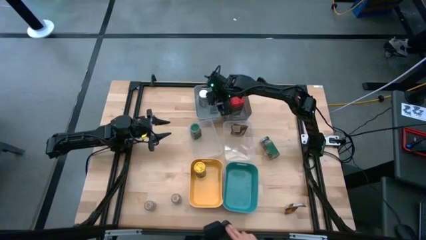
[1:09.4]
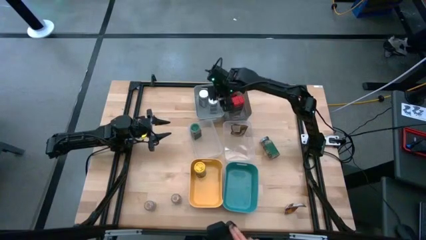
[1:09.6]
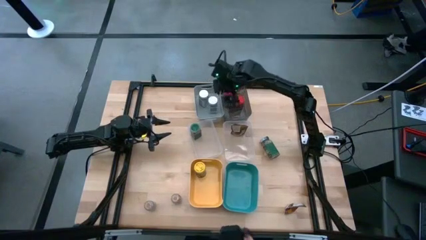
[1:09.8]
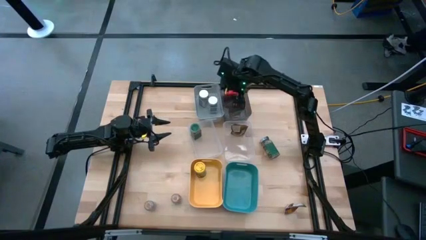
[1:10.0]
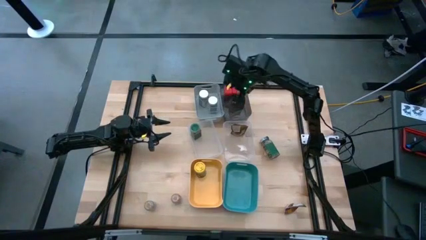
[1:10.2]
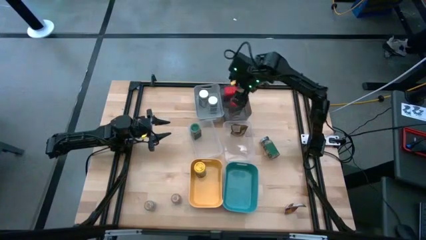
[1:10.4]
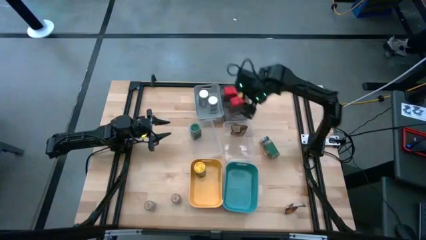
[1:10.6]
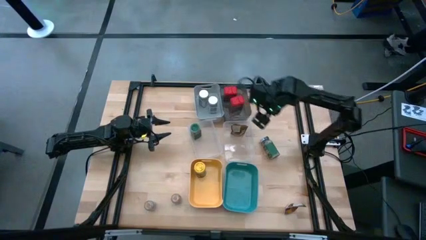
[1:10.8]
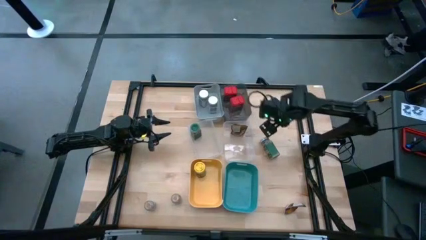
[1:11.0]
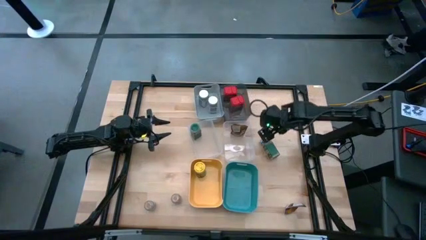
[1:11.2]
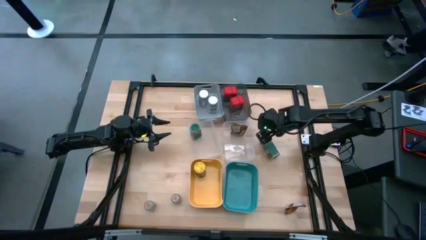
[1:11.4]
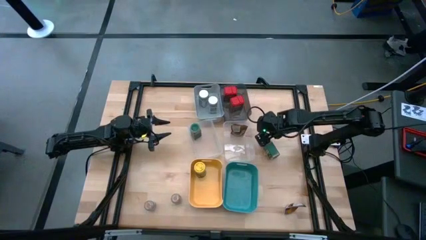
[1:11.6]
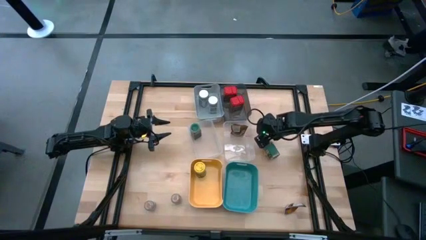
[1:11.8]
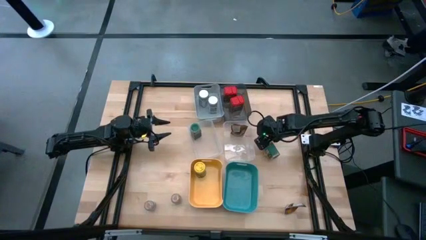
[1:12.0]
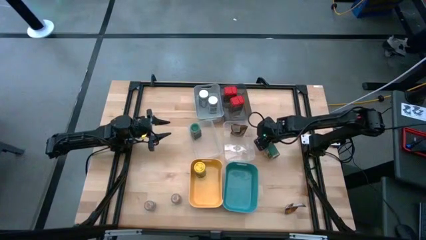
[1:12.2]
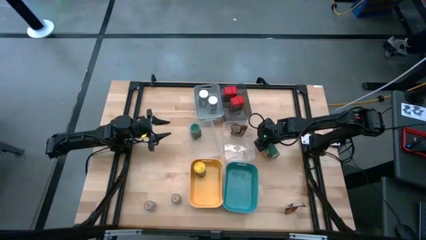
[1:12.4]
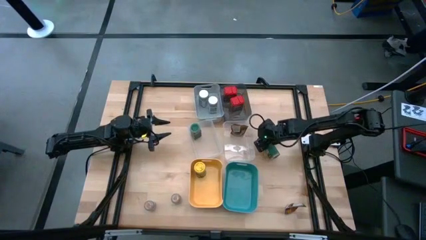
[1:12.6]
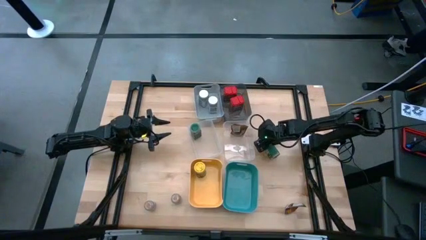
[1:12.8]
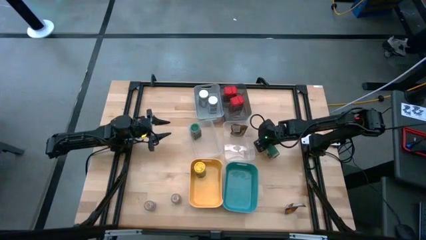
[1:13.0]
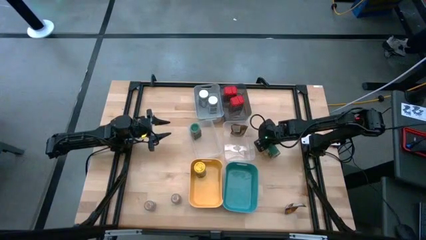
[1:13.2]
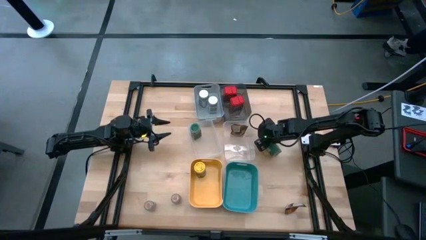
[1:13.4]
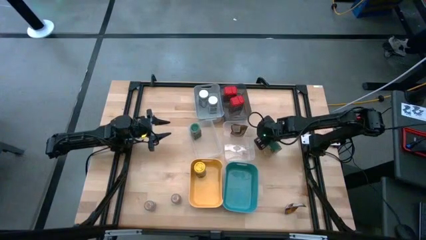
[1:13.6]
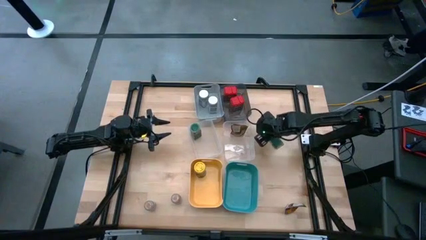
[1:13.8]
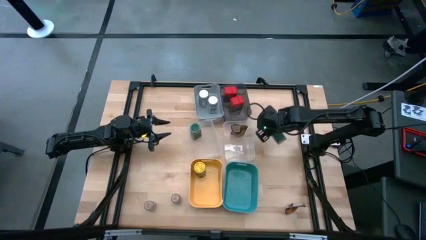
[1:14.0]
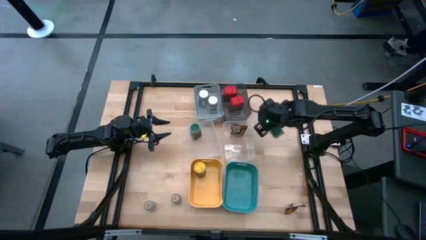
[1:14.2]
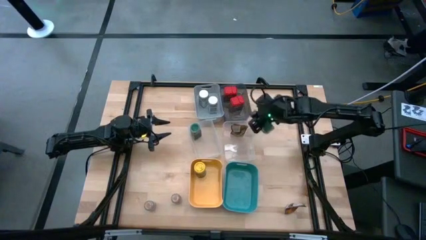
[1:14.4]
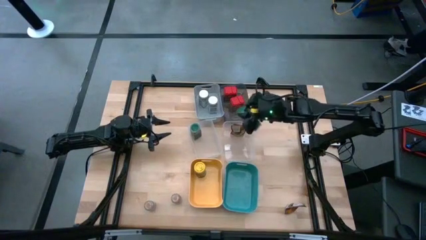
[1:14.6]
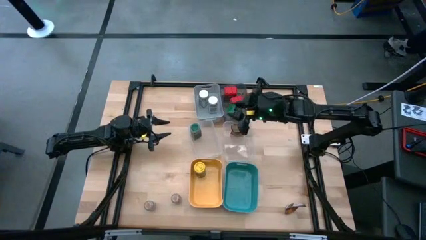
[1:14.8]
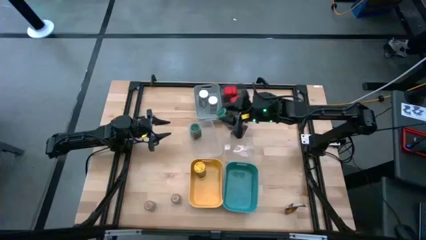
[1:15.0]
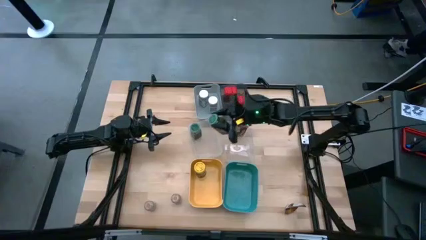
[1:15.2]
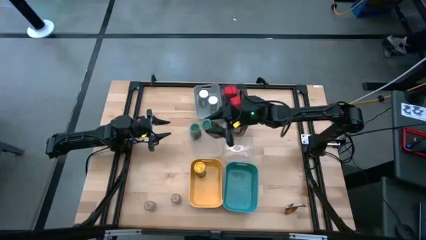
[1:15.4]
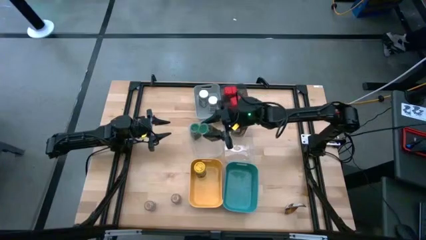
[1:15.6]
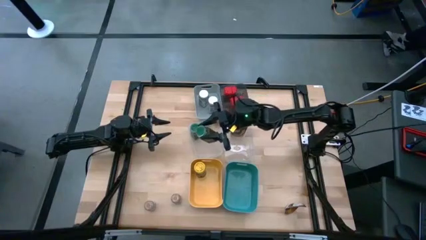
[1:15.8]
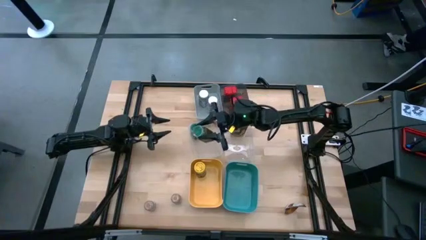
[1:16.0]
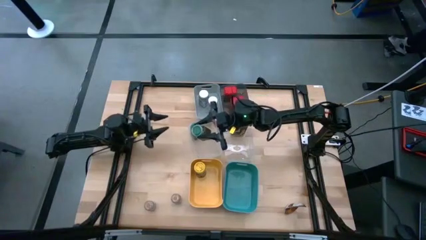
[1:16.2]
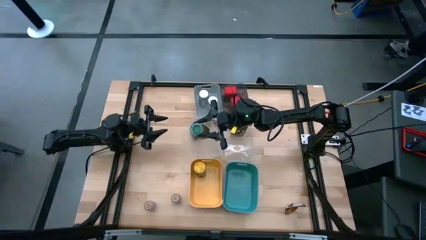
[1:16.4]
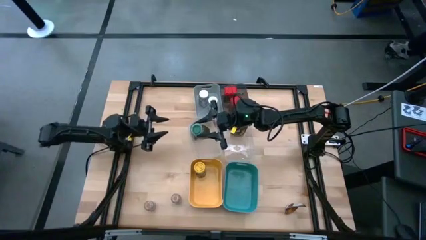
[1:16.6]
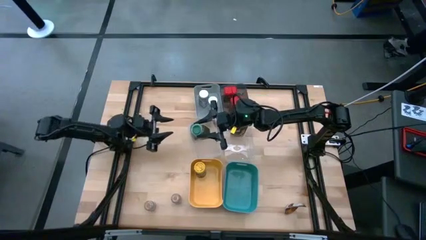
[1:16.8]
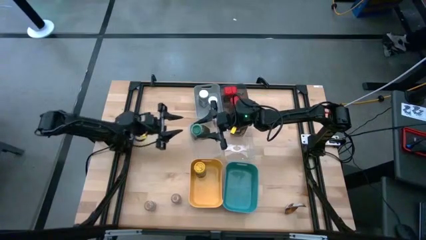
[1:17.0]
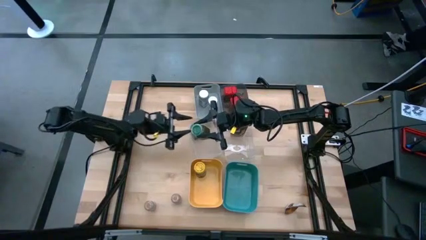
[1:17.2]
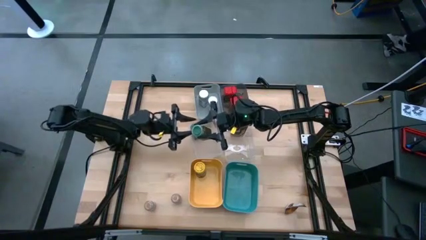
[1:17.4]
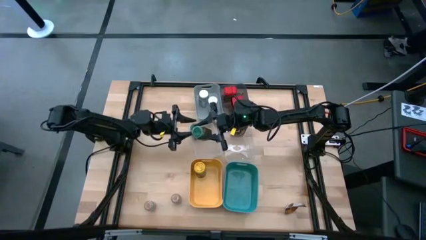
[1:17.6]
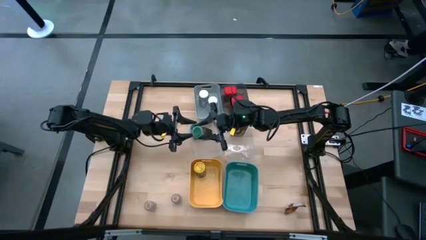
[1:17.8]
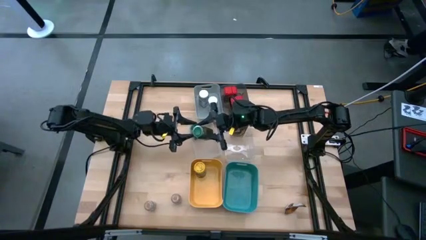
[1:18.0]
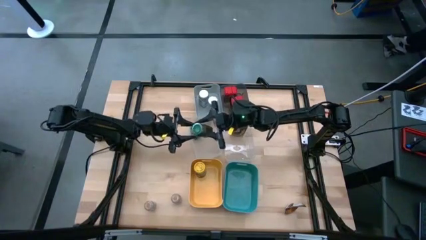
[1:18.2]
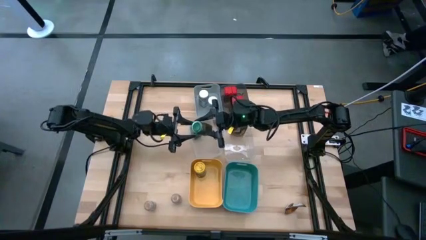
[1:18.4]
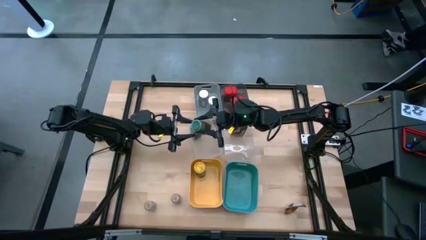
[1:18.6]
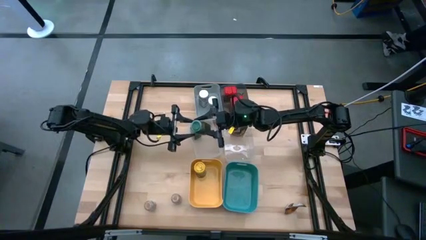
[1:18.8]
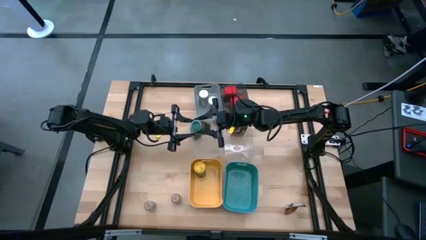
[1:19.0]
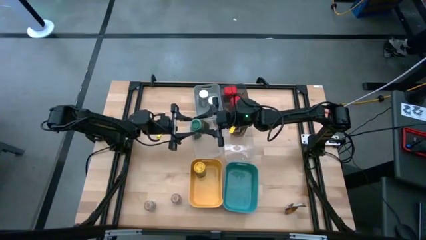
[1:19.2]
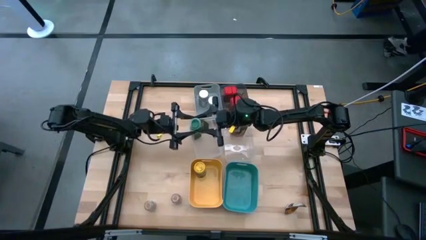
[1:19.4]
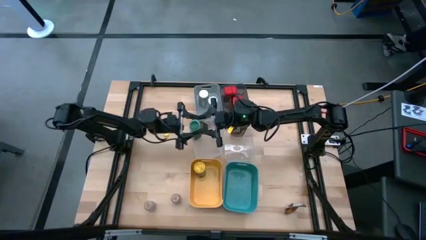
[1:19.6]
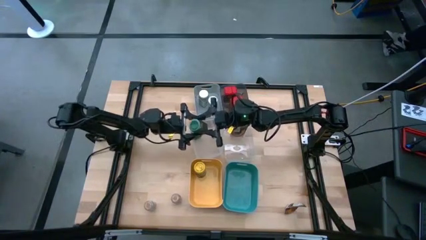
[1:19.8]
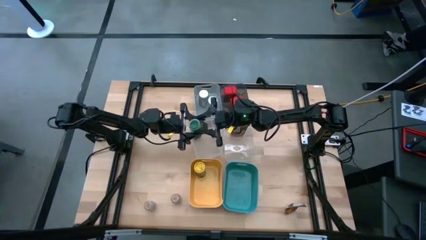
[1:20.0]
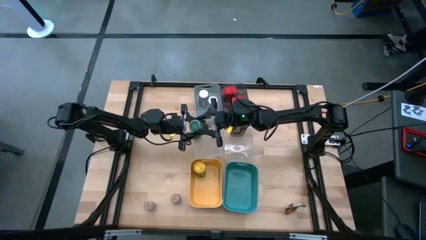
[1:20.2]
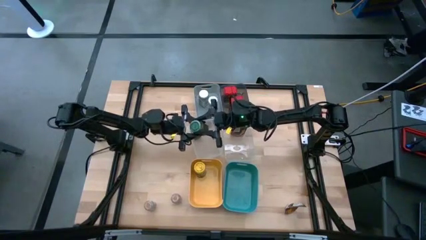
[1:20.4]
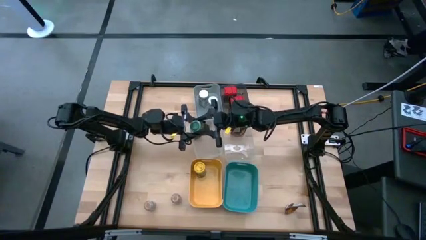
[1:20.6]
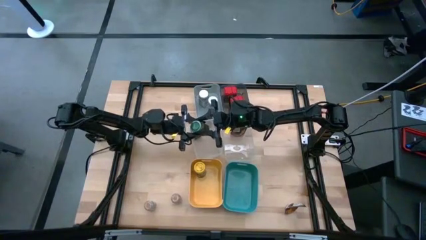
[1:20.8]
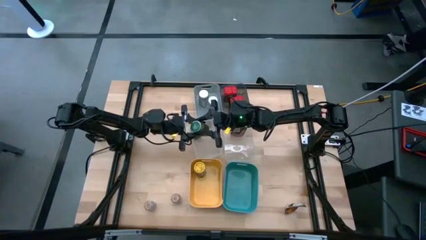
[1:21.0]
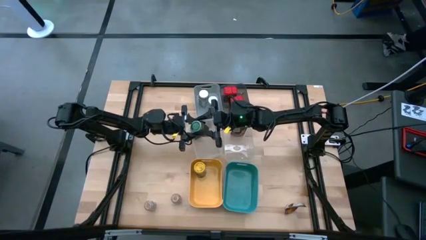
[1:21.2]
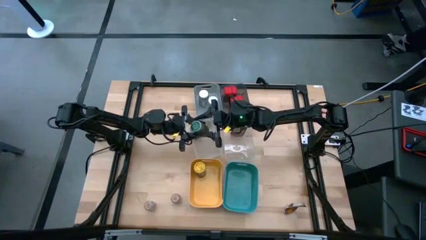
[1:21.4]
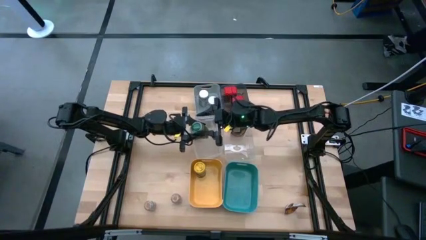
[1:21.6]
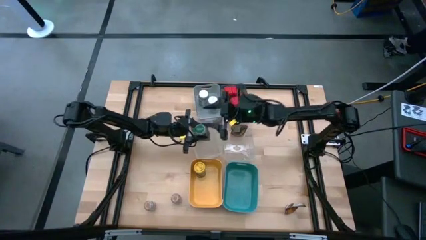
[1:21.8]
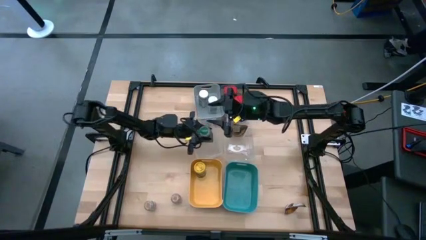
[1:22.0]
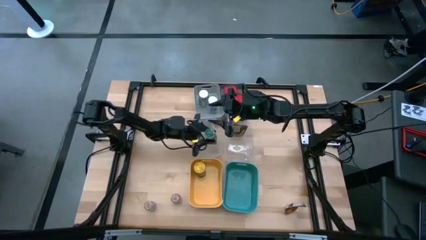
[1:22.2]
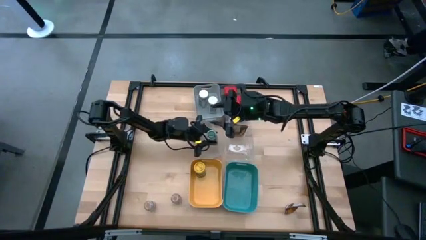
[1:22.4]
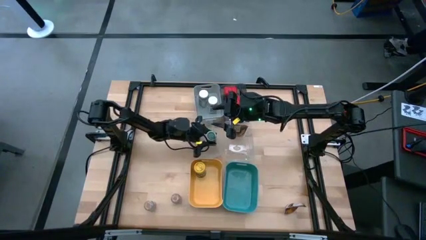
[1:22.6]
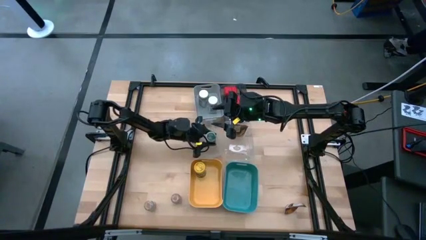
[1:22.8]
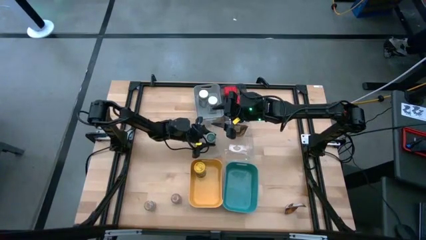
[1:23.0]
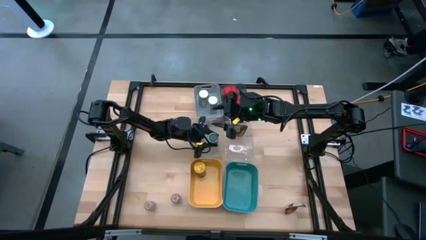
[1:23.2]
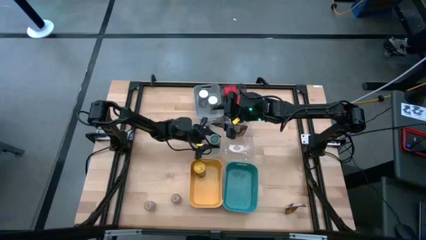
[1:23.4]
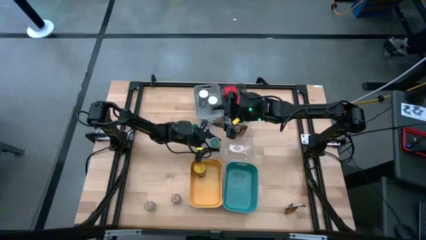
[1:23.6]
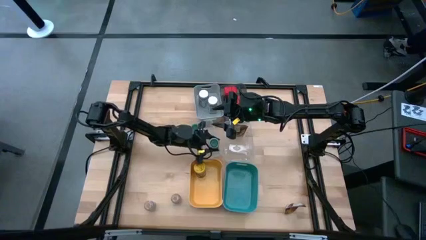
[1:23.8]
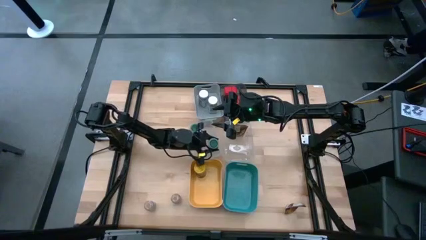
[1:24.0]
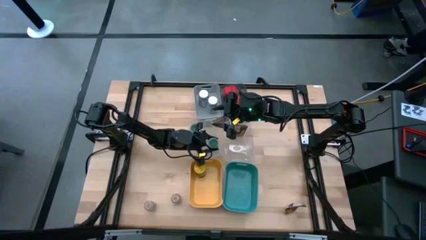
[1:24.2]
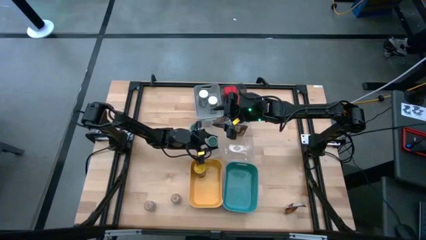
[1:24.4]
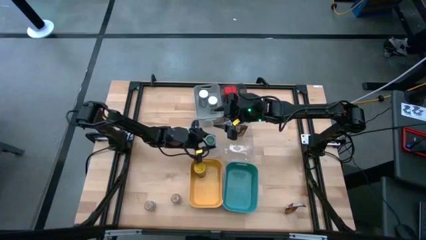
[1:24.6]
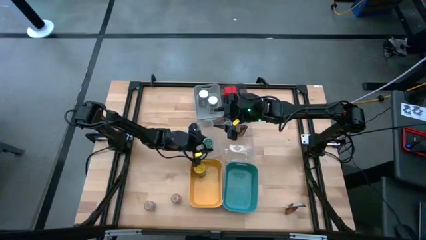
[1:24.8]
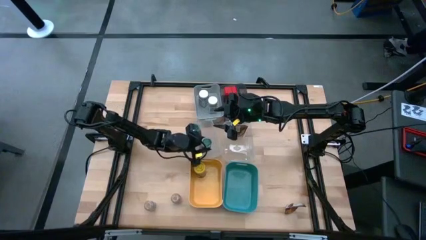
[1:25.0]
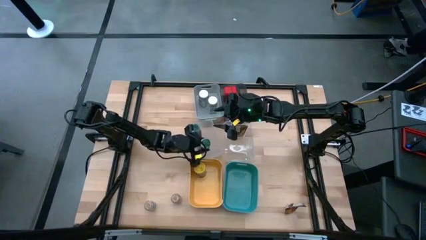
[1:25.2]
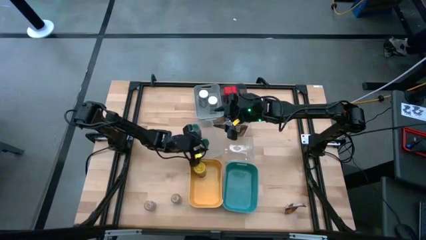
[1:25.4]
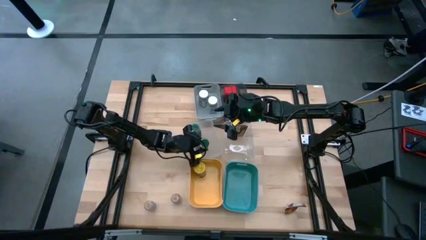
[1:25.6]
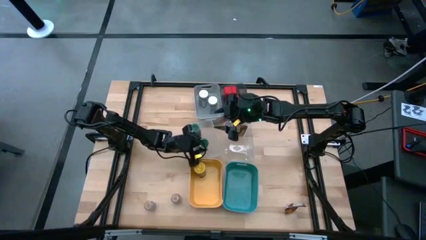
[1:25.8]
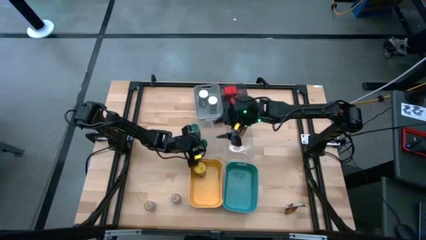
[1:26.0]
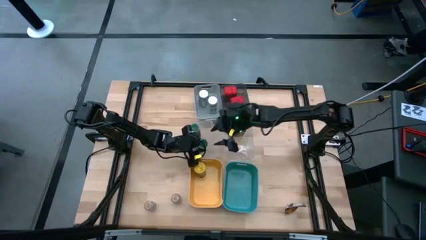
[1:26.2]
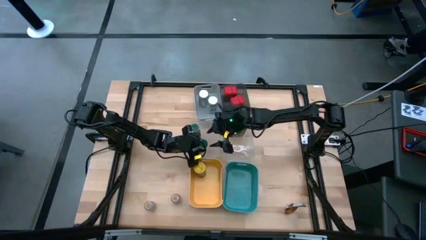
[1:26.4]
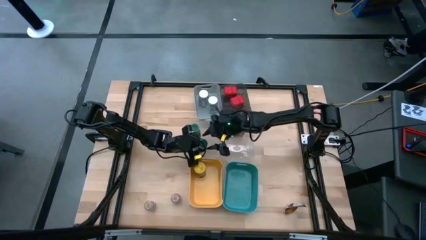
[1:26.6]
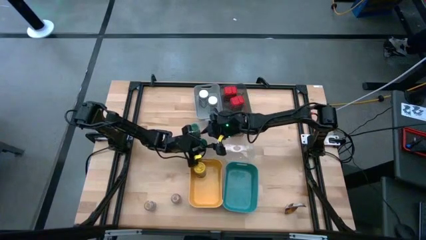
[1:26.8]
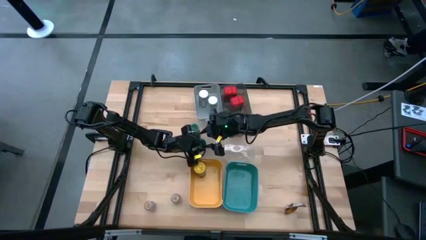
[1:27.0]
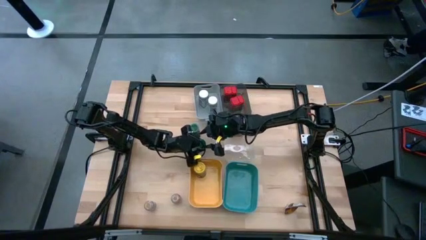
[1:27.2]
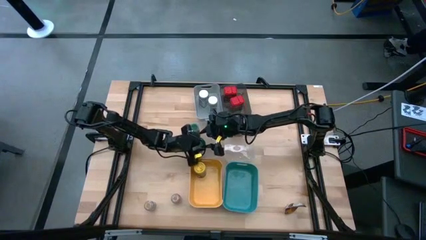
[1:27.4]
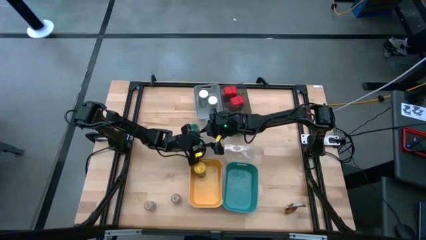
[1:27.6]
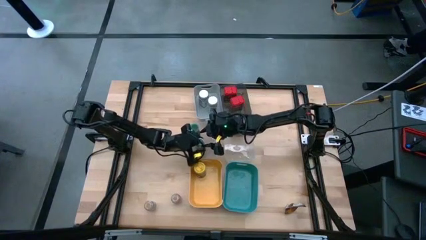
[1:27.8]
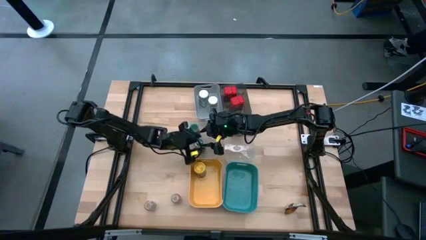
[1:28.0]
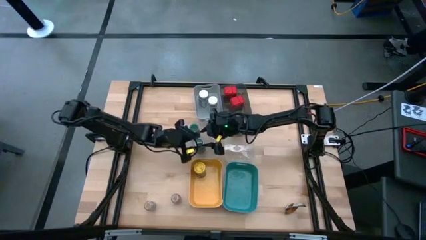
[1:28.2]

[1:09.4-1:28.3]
Task: Sort spices by type
Put the green seasoning bottle into the left transparent bin
